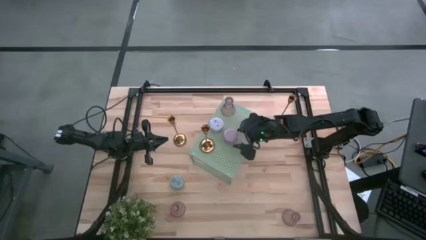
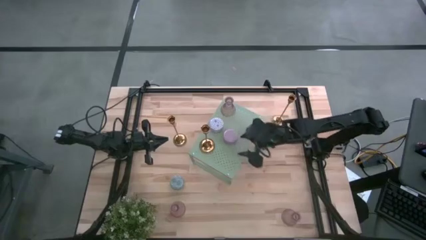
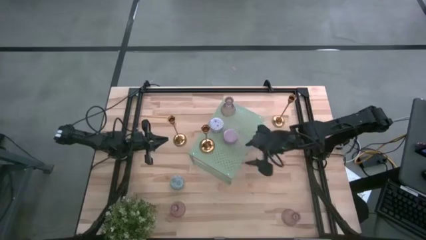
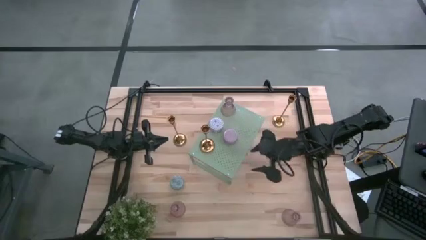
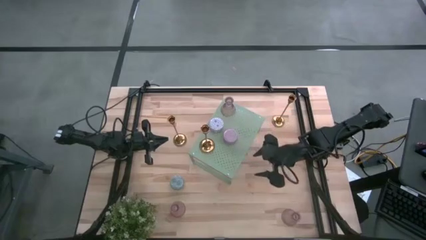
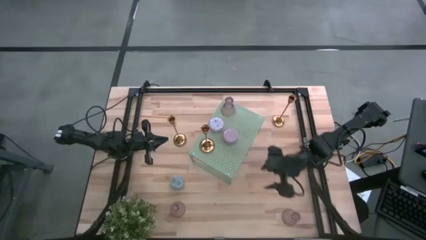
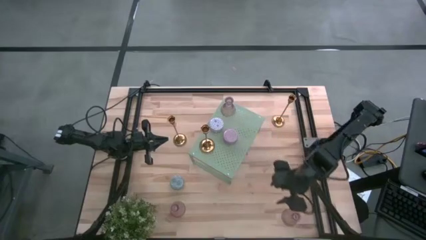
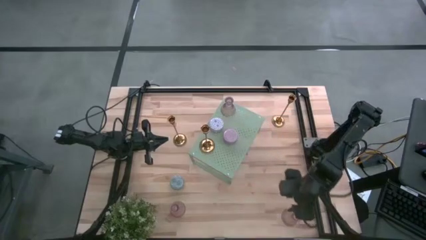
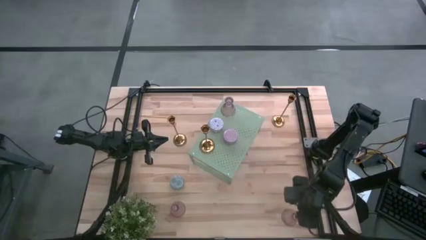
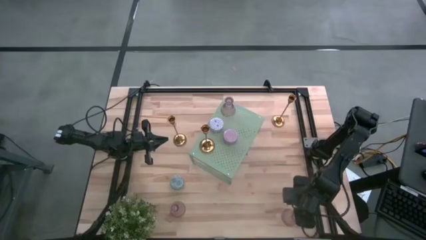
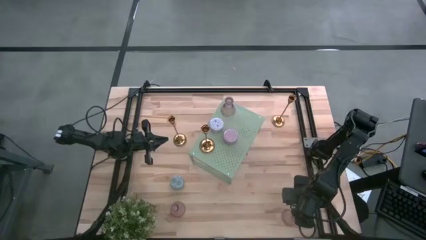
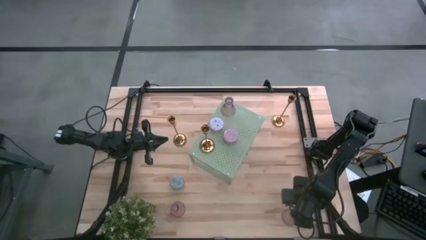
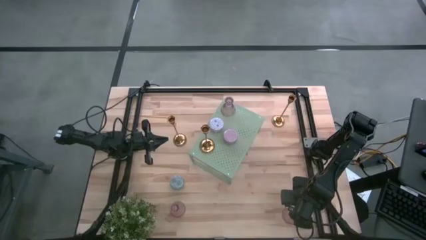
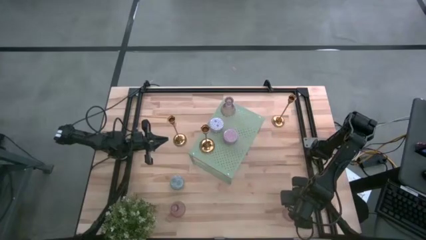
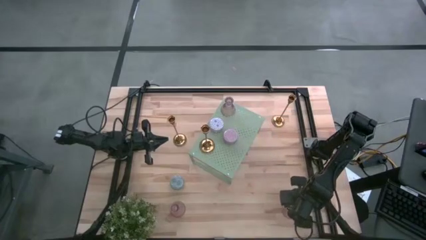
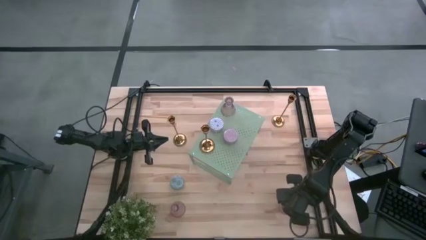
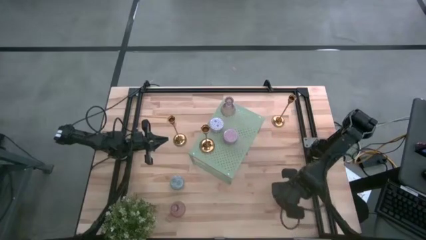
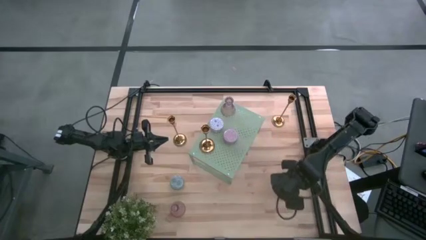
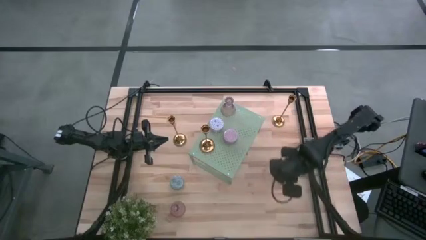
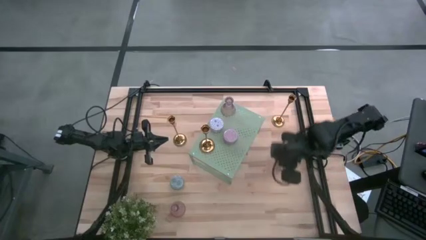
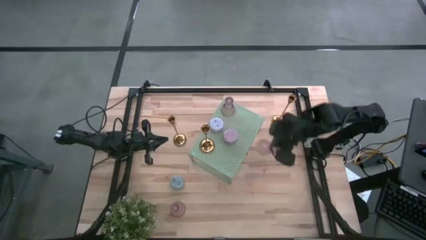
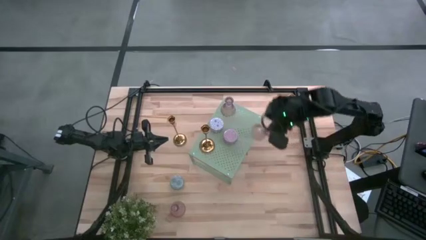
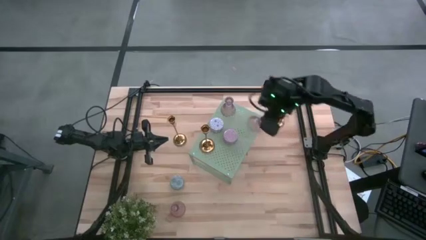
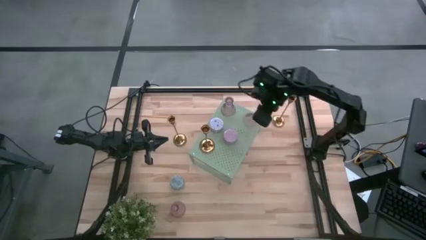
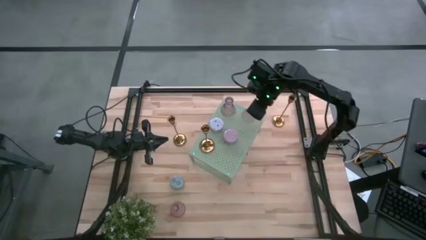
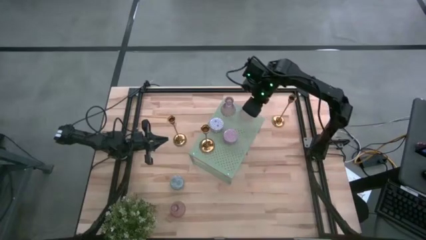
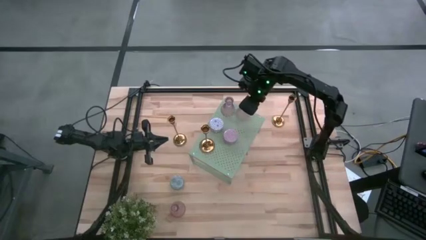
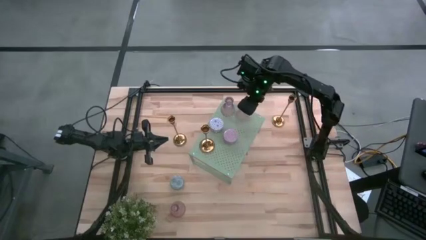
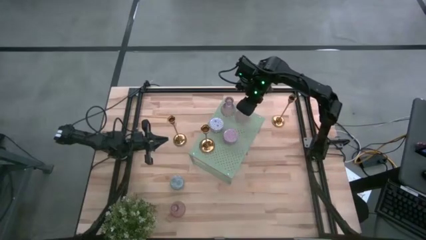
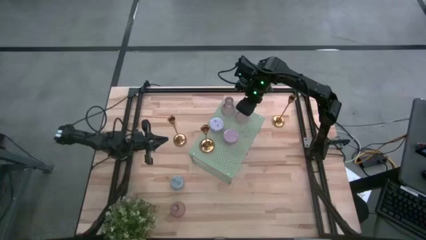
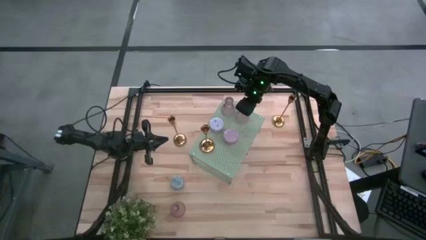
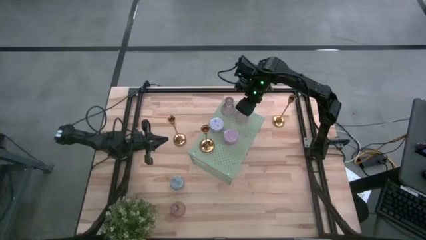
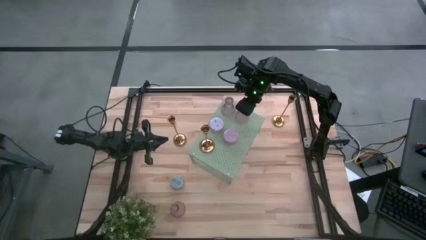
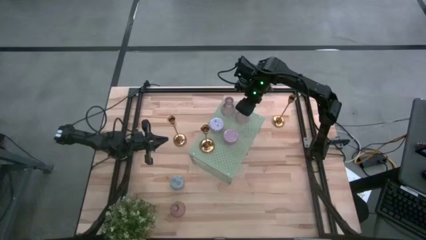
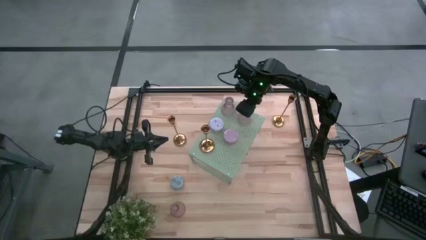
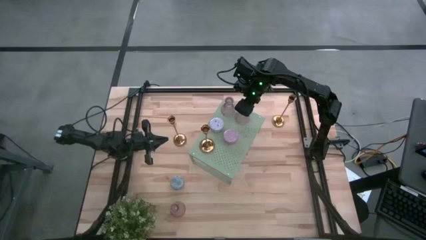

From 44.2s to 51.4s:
Task: Pick & Place candle stick holders
Put the right purple glass candle holder aligned with the other purple glass candle holder on the shelf

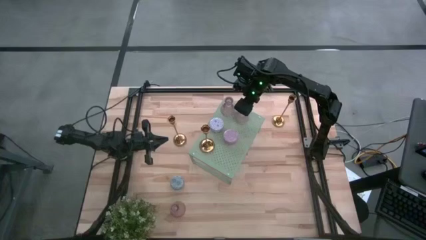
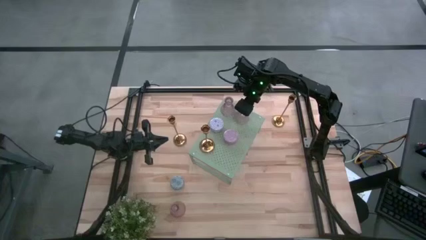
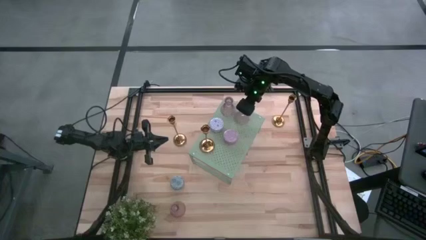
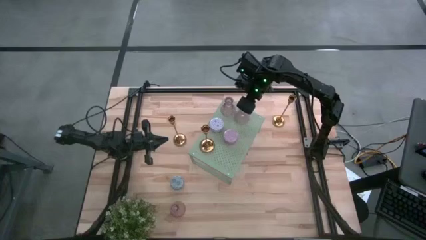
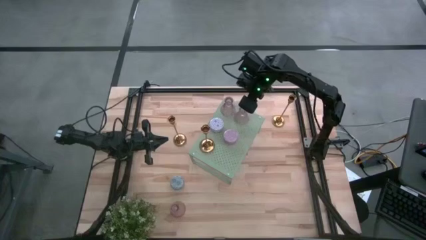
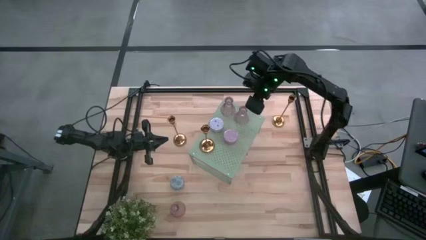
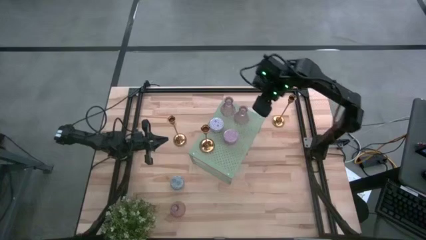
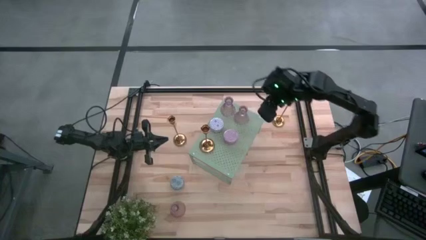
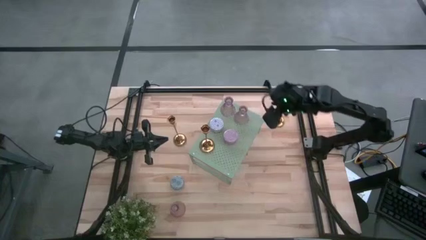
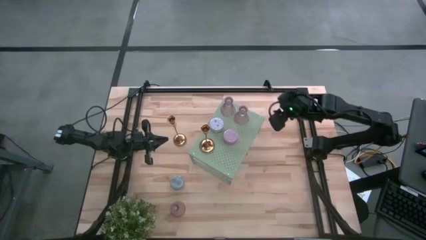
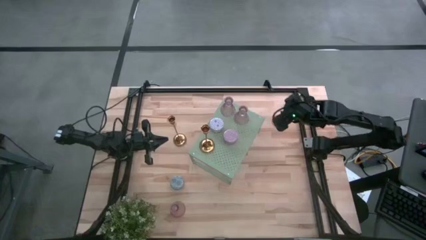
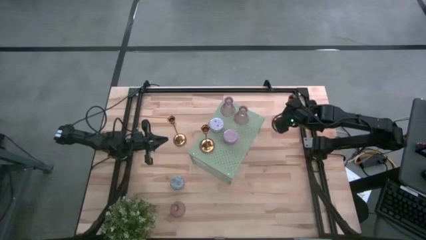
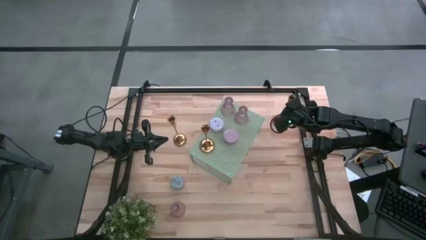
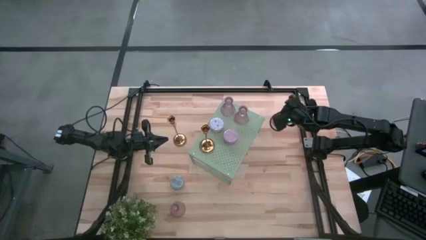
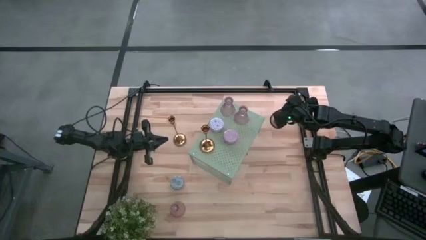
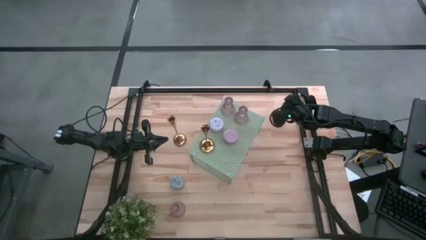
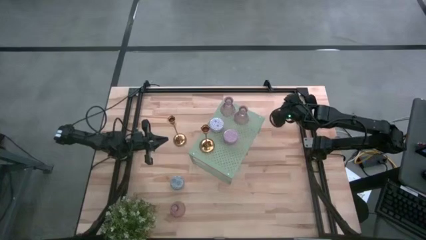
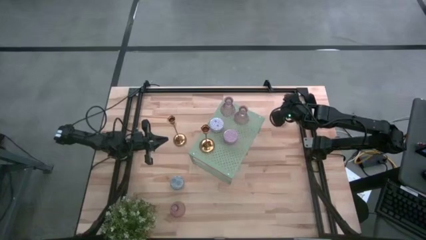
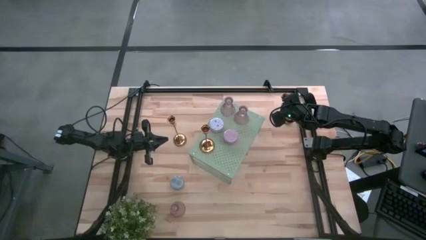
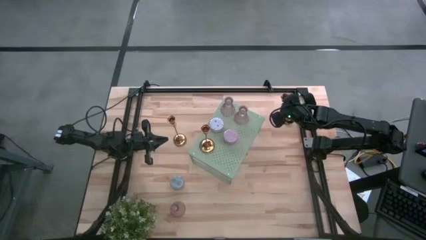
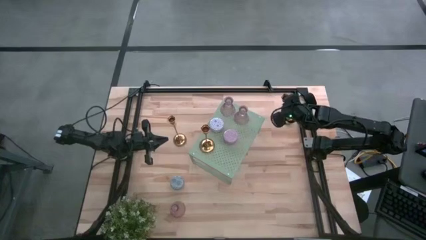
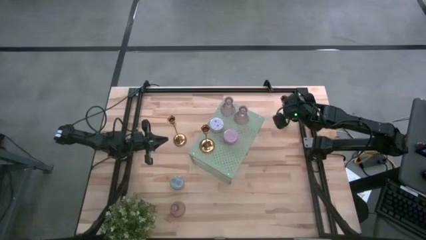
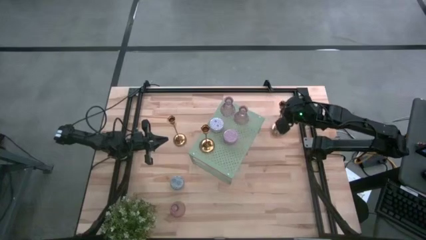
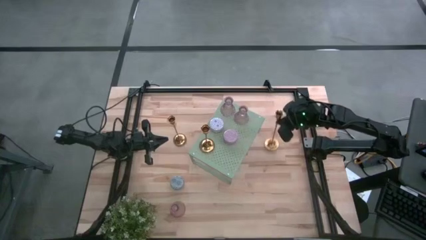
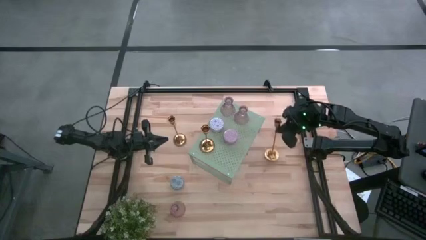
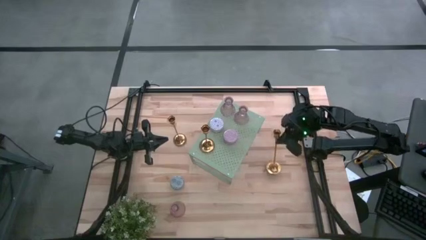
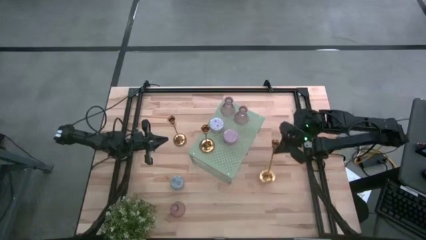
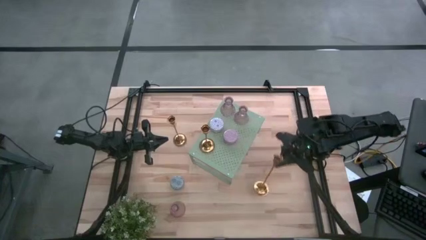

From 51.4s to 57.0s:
Put the right gold candle holder aligned with the other gold candle holder on the shelf
